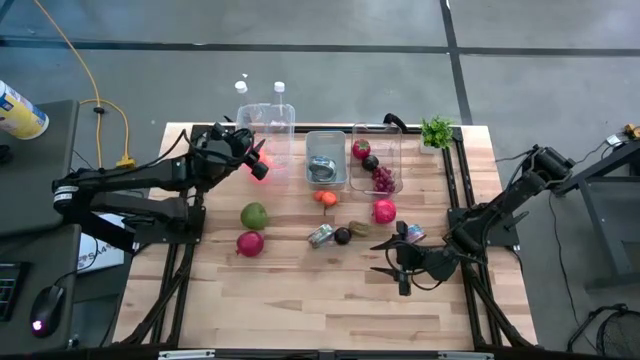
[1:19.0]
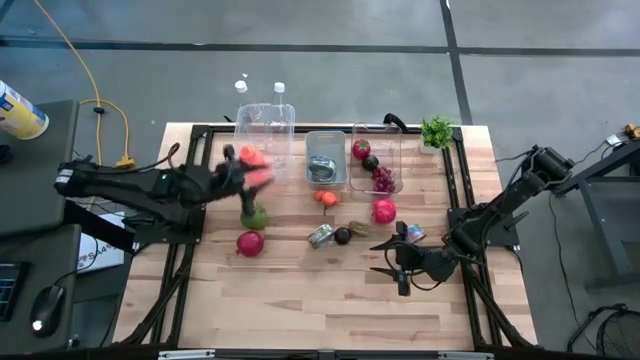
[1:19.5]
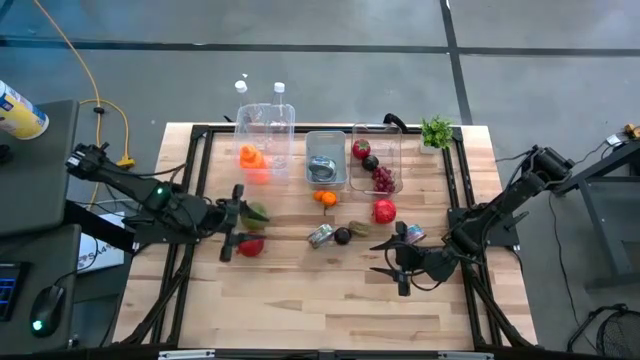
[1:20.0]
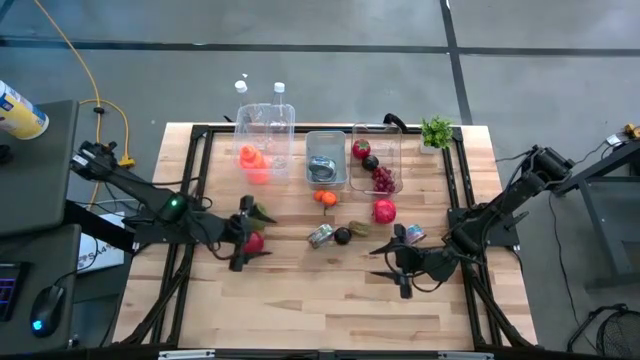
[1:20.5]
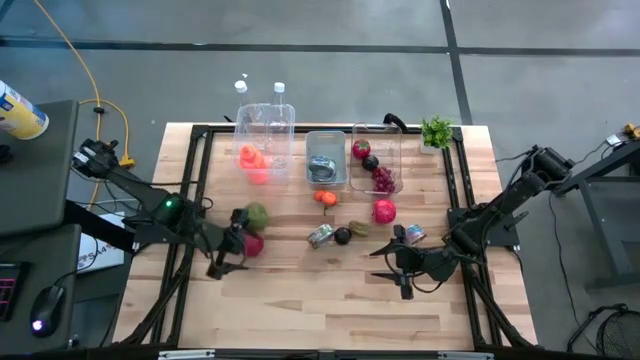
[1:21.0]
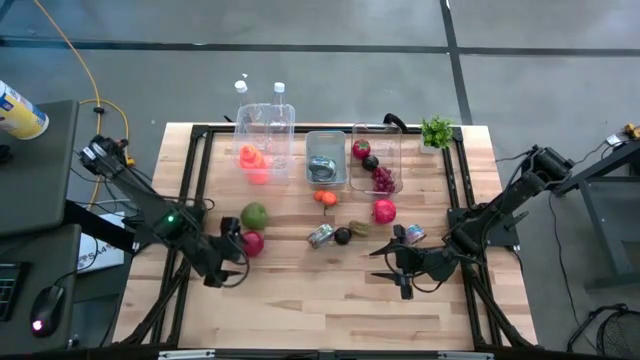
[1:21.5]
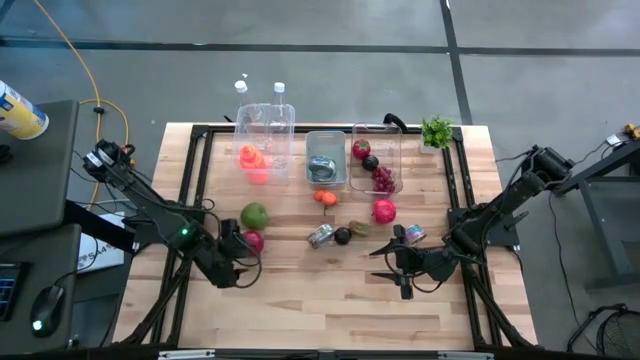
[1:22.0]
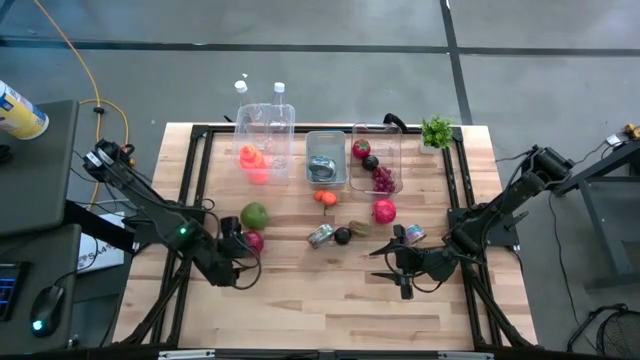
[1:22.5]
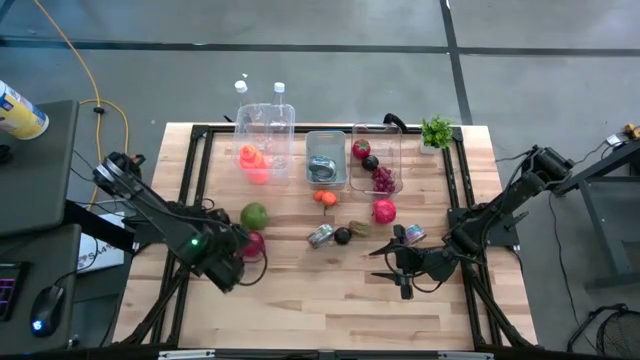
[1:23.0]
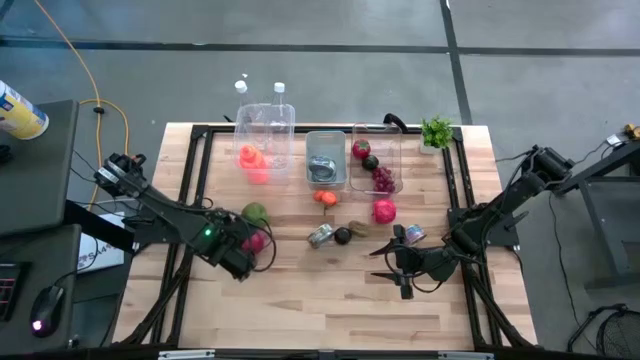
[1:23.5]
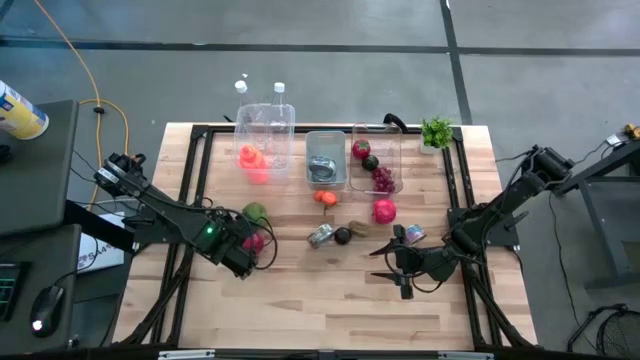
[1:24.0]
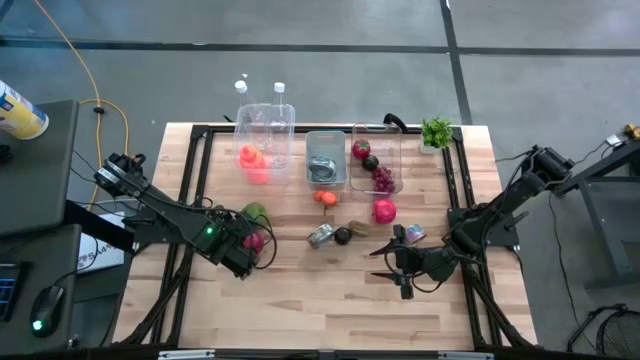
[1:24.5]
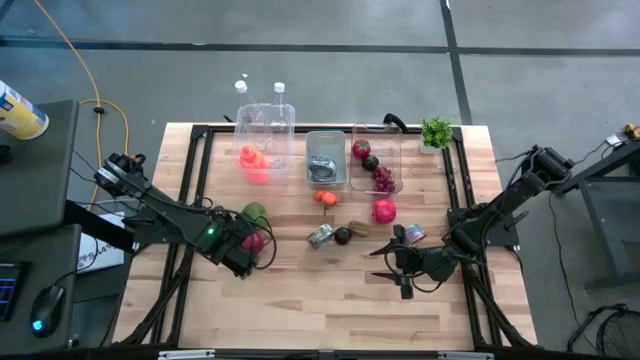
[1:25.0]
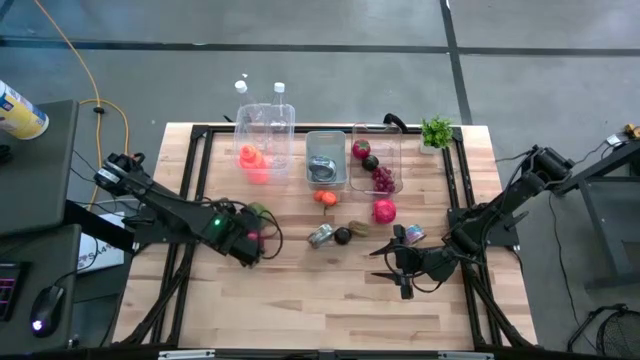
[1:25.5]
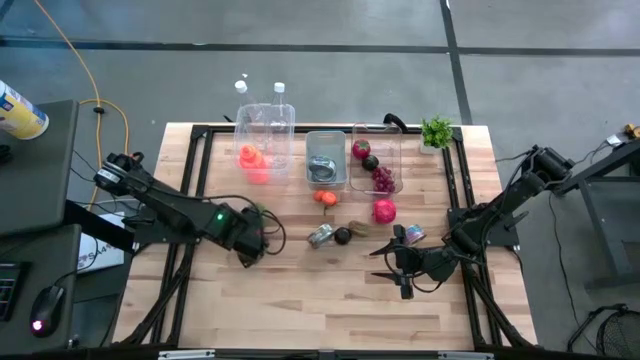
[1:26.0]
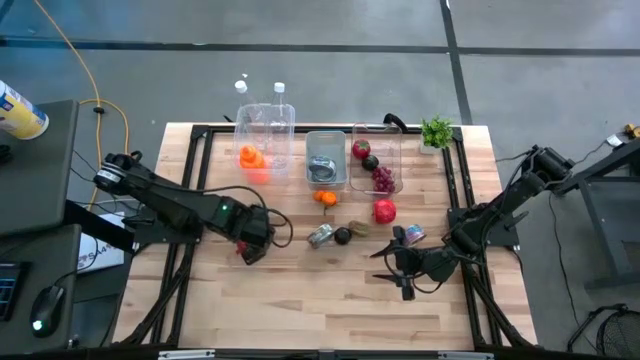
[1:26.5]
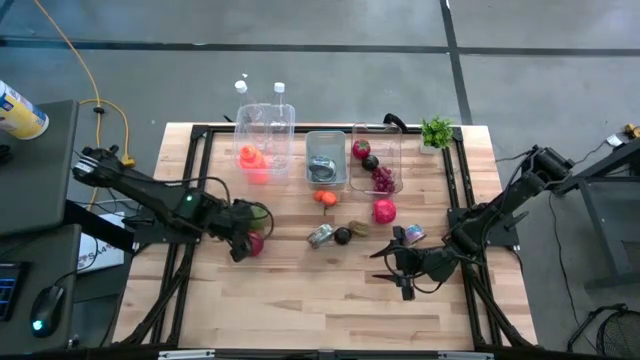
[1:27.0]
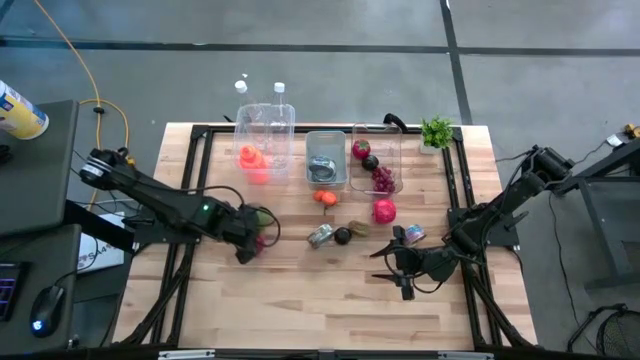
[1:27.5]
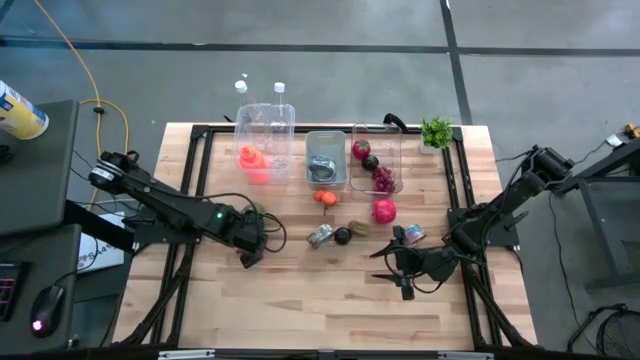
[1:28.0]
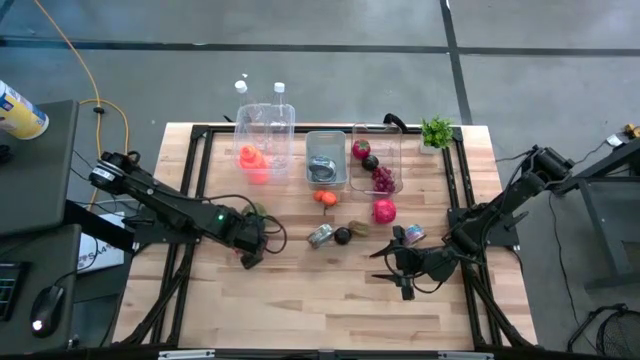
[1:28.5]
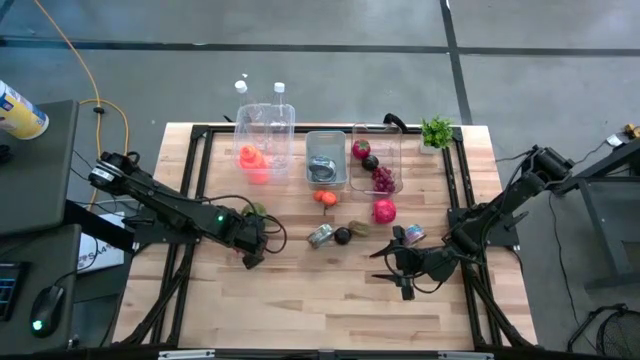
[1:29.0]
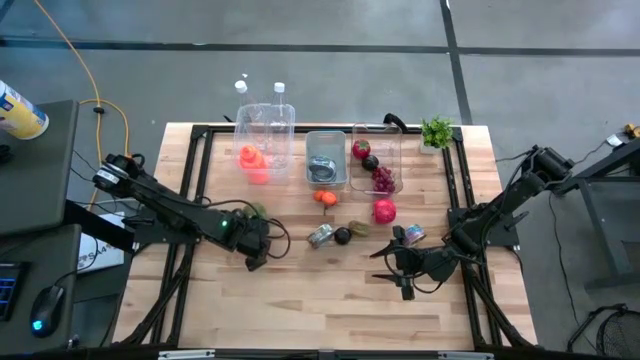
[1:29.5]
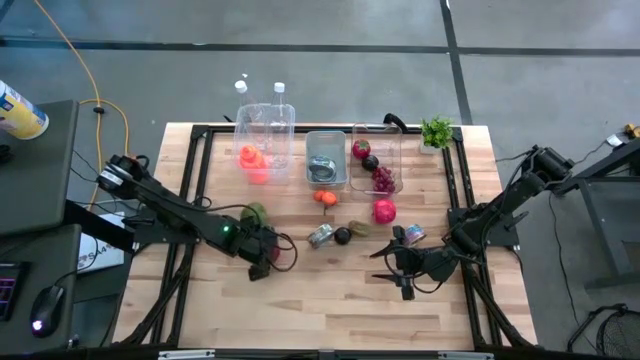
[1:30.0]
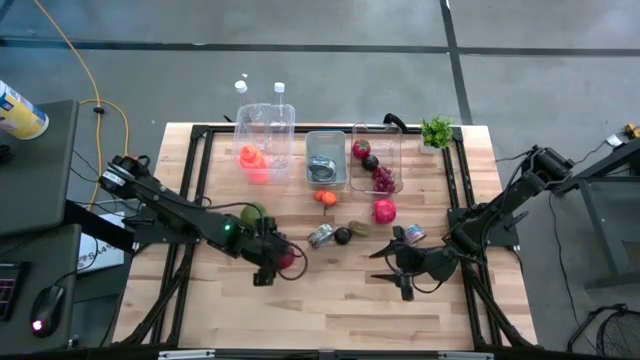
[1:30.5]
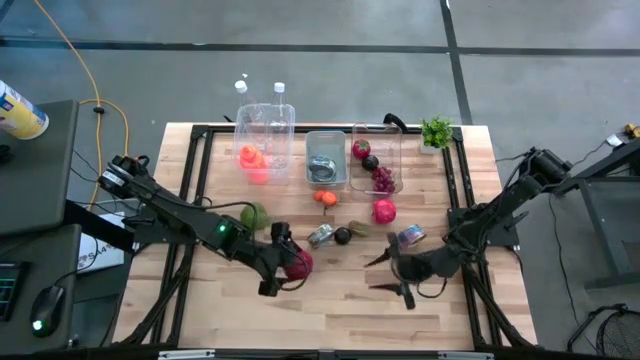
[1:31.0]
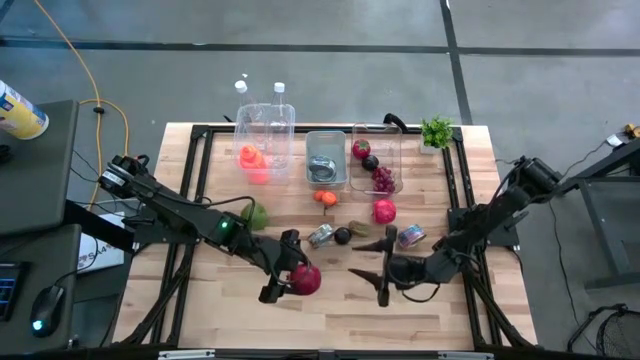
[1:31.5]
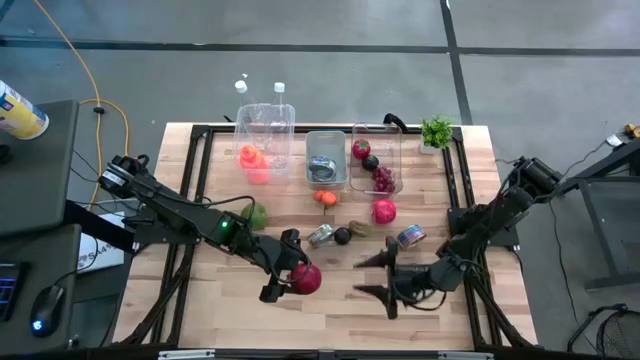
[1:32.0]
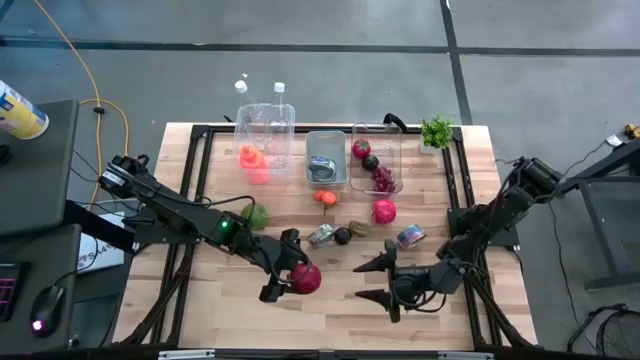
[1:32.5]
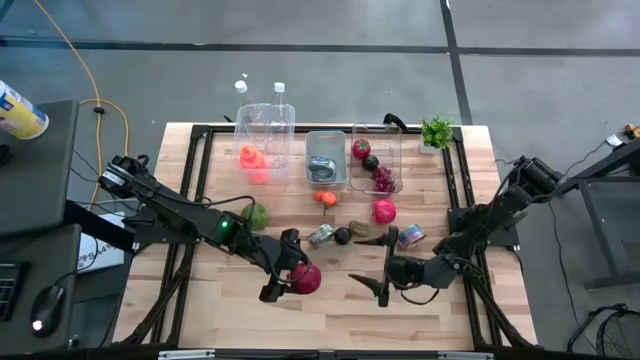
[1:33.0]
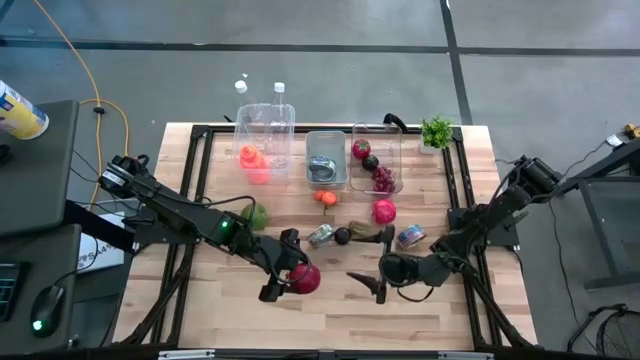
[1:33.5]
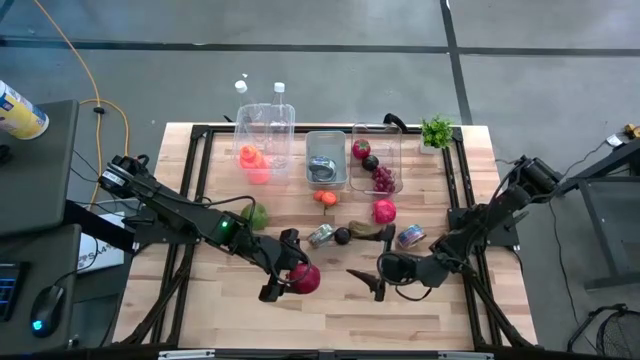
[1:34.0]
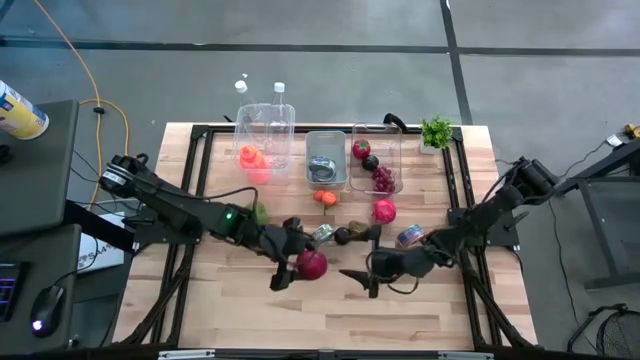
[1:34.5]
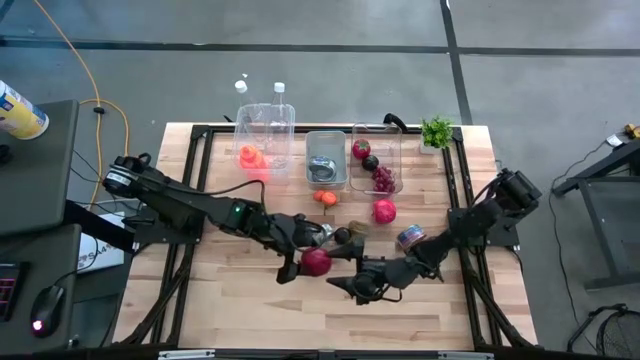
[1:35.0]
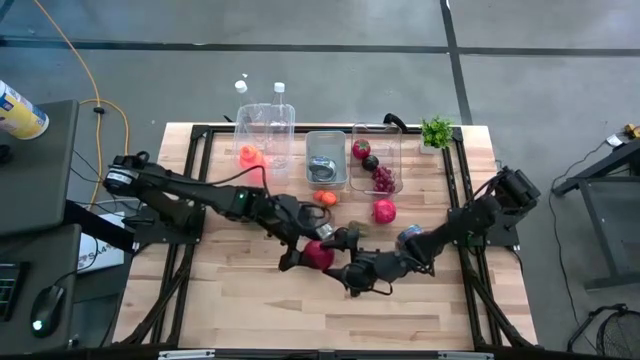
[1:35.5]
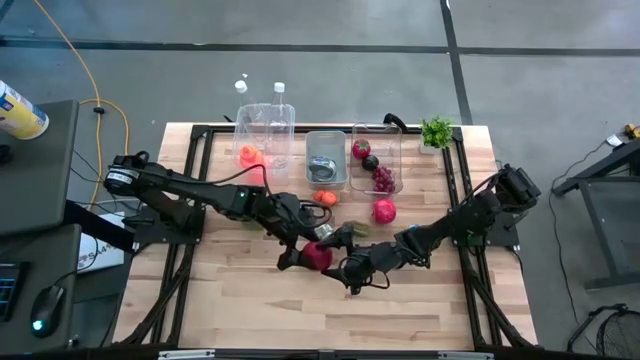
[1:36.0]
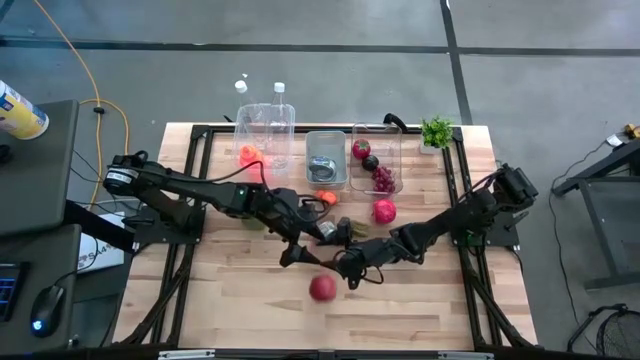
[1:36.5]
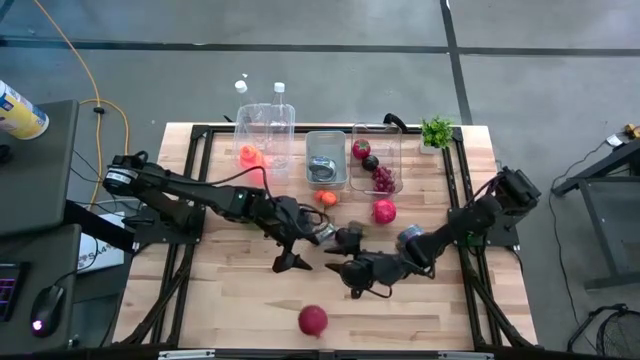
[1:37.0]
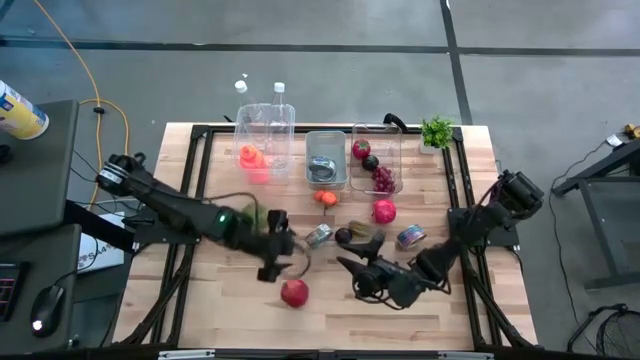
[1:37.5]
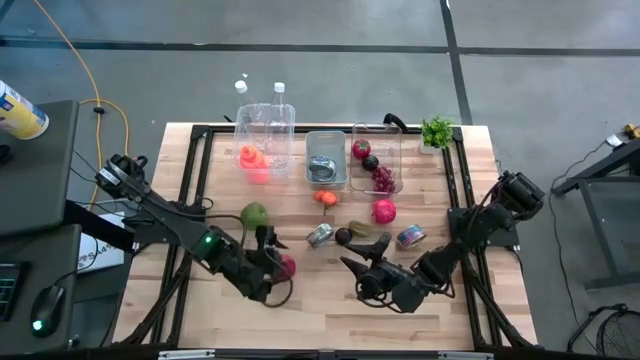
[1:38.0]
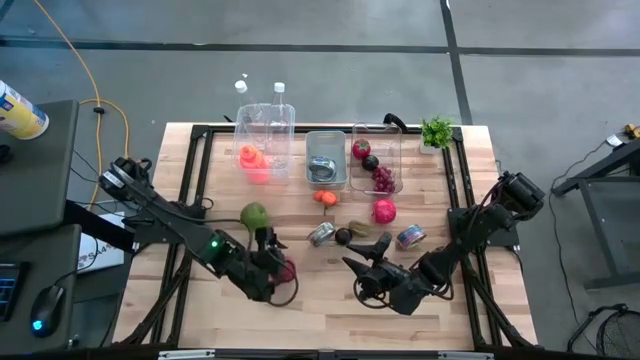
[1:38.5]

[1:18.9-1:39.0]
Task: Pick & Place Food Item
Put the pomegranate into the transparent bin
